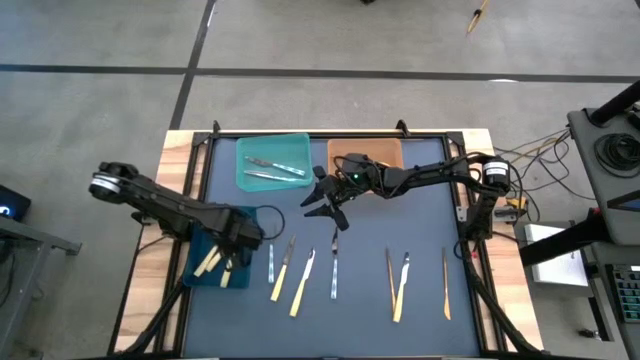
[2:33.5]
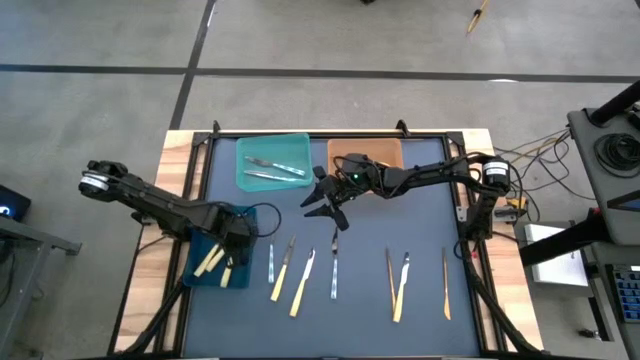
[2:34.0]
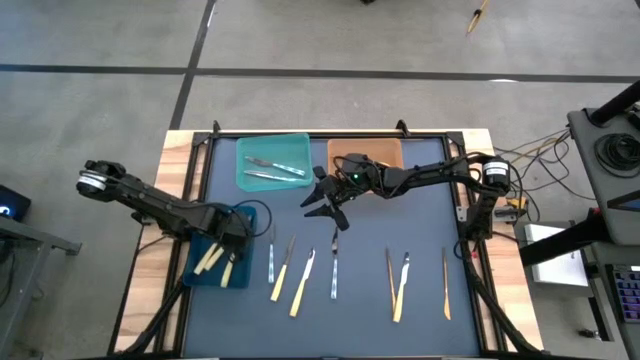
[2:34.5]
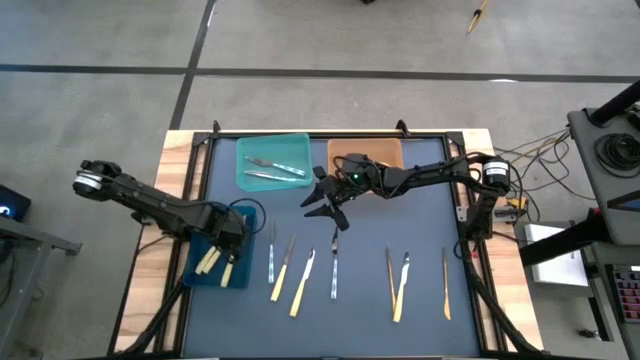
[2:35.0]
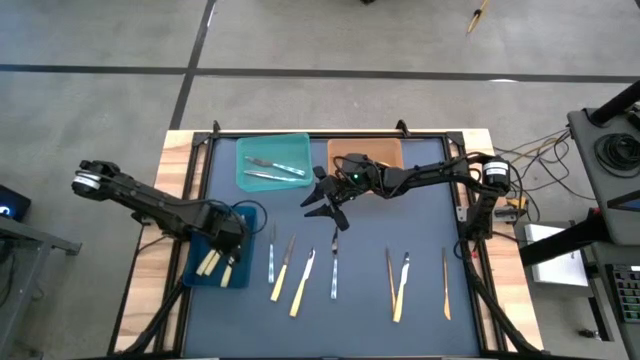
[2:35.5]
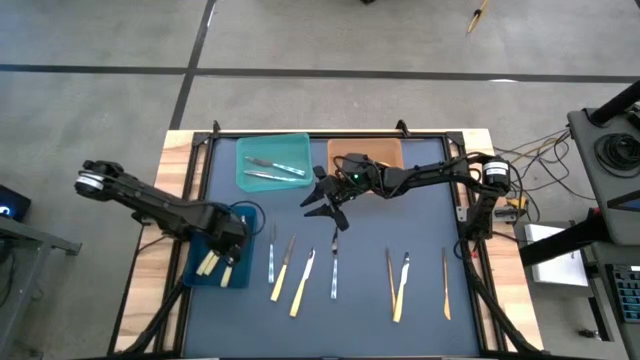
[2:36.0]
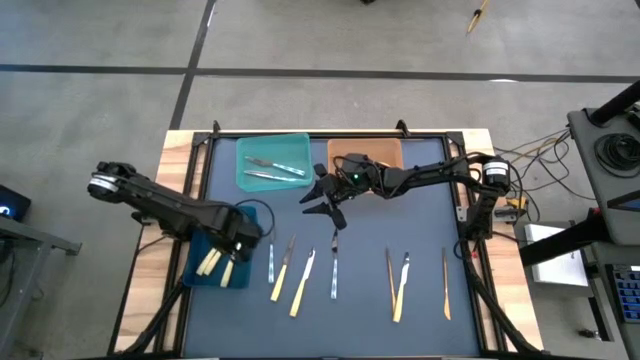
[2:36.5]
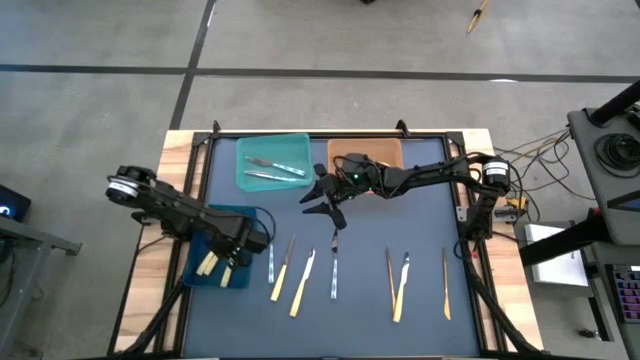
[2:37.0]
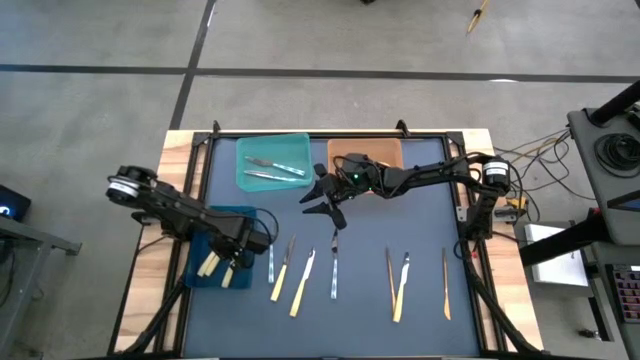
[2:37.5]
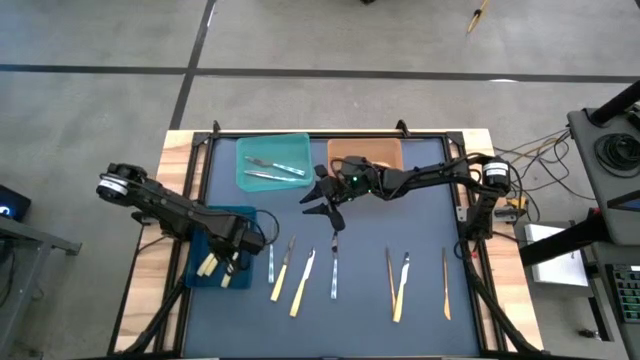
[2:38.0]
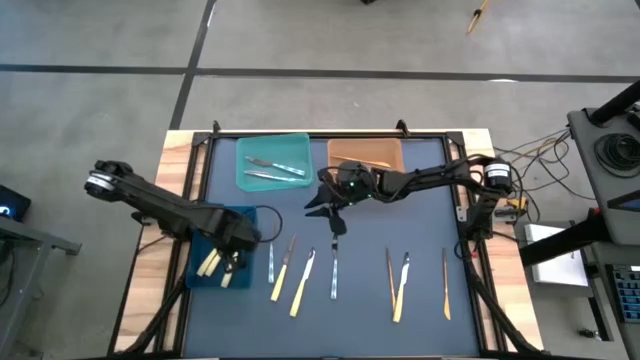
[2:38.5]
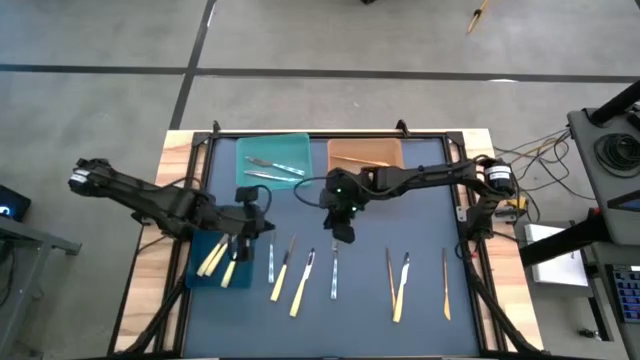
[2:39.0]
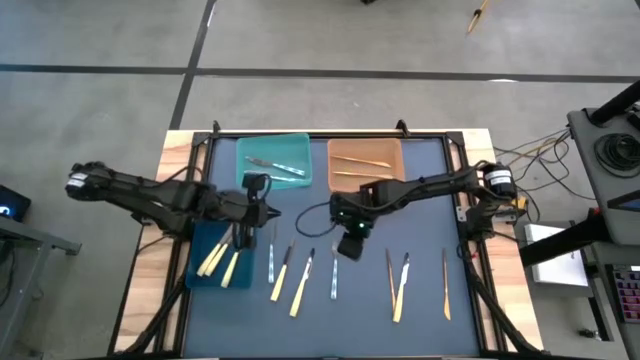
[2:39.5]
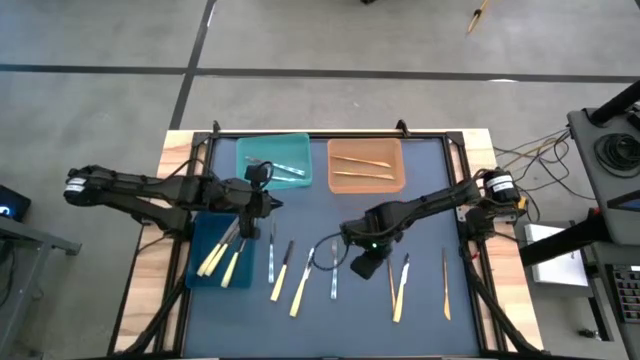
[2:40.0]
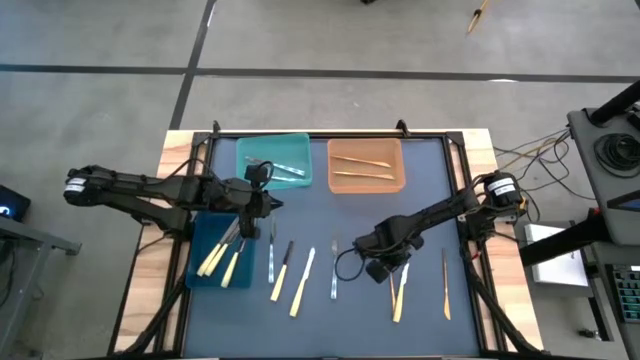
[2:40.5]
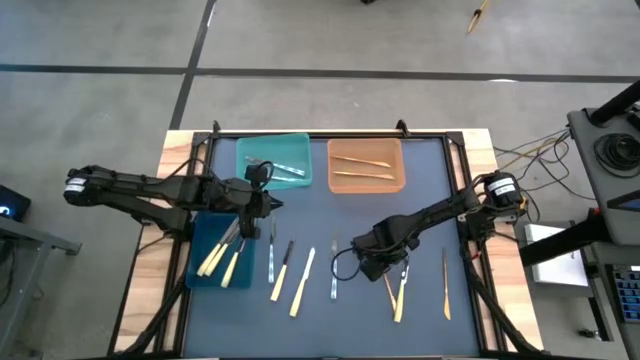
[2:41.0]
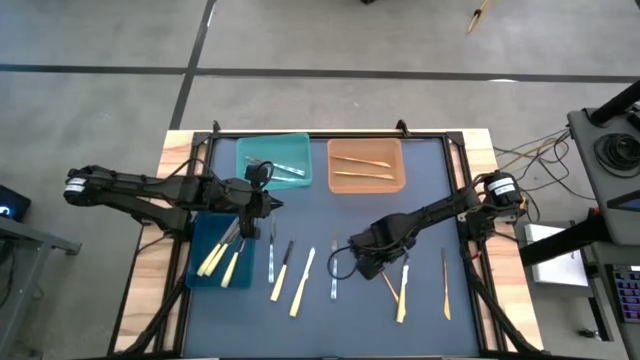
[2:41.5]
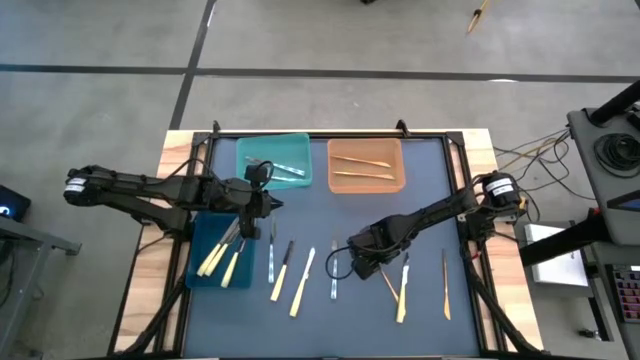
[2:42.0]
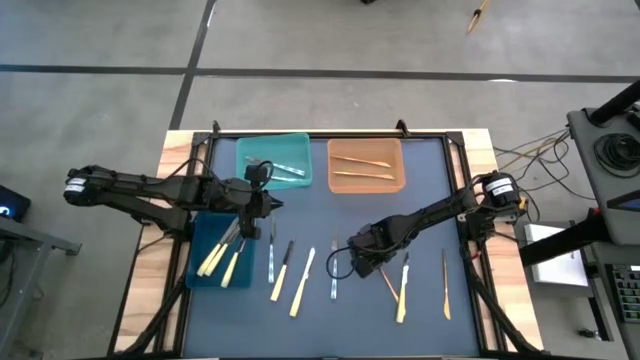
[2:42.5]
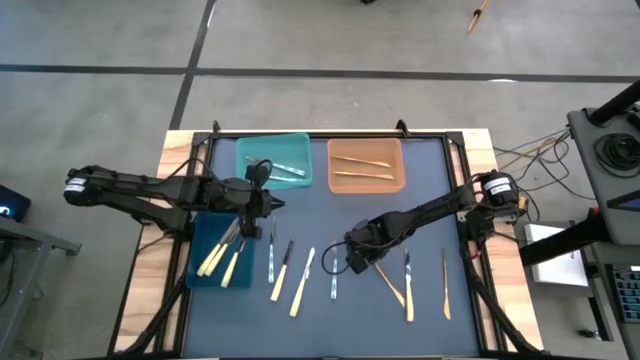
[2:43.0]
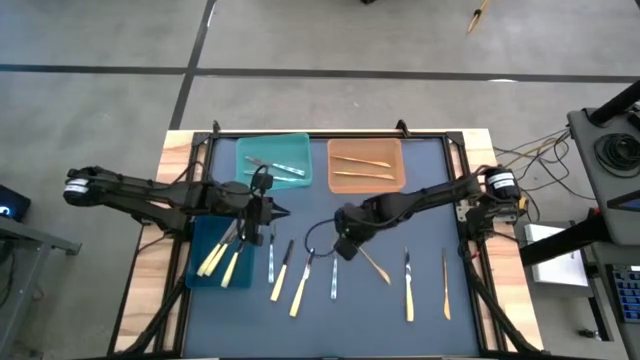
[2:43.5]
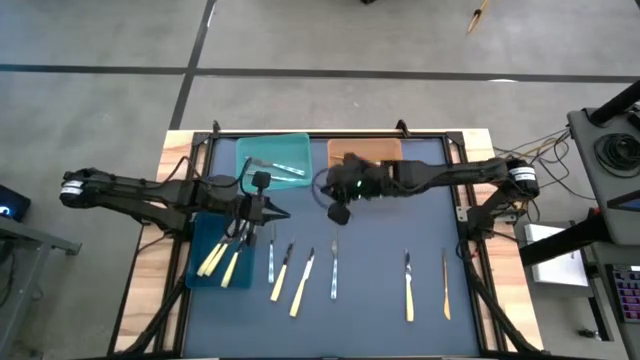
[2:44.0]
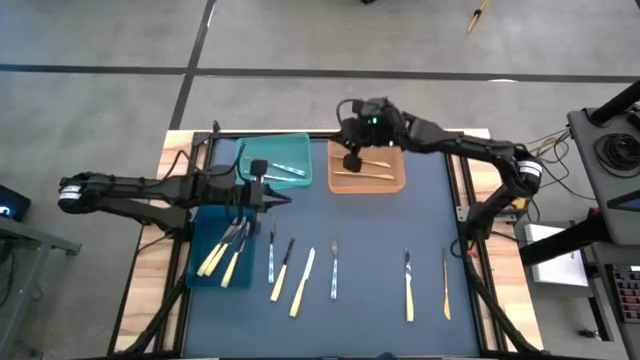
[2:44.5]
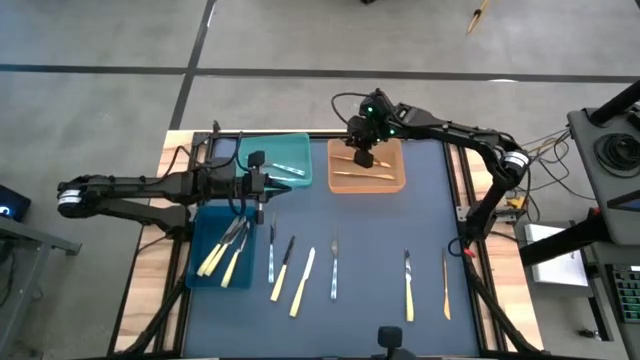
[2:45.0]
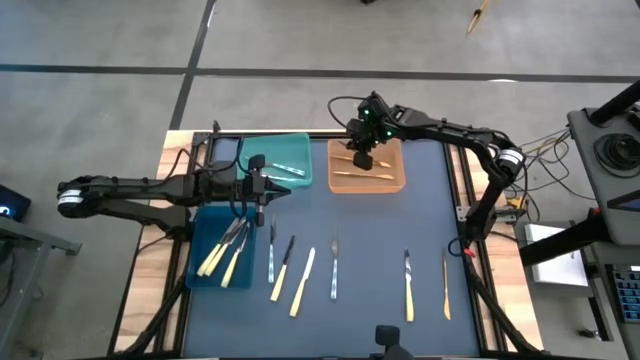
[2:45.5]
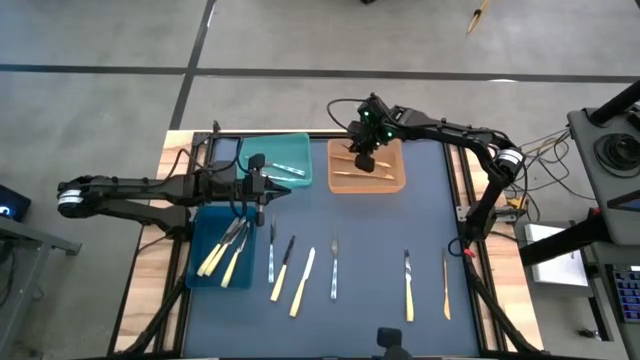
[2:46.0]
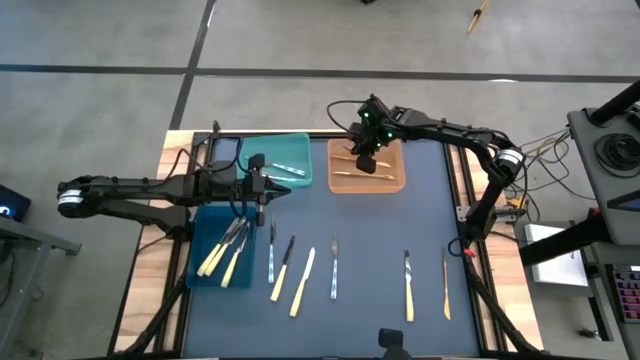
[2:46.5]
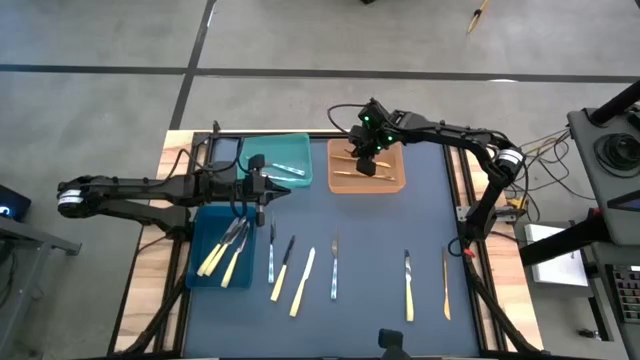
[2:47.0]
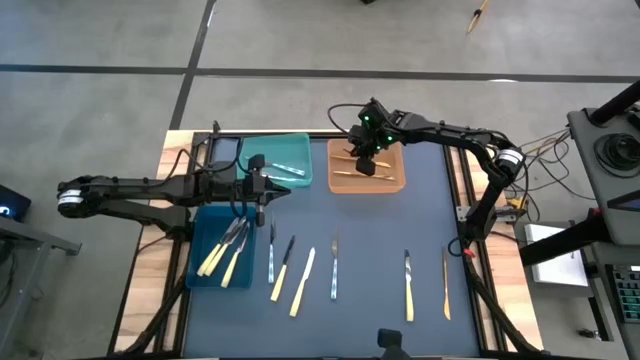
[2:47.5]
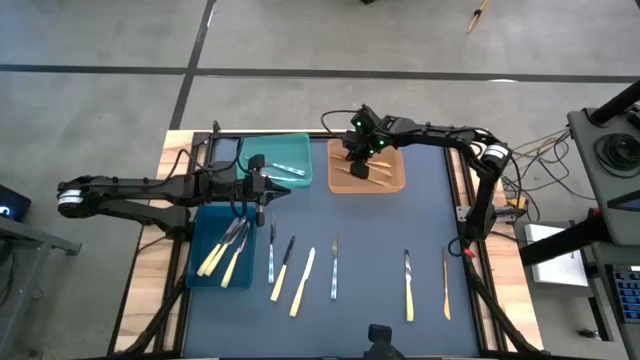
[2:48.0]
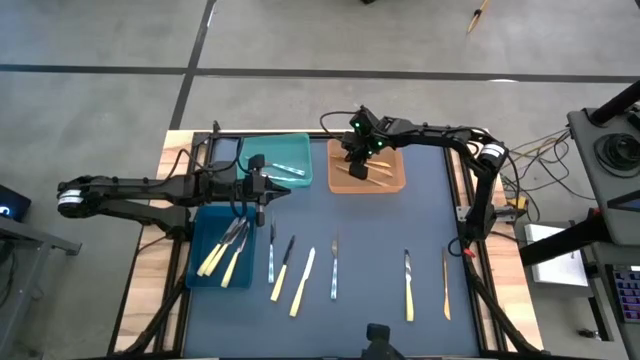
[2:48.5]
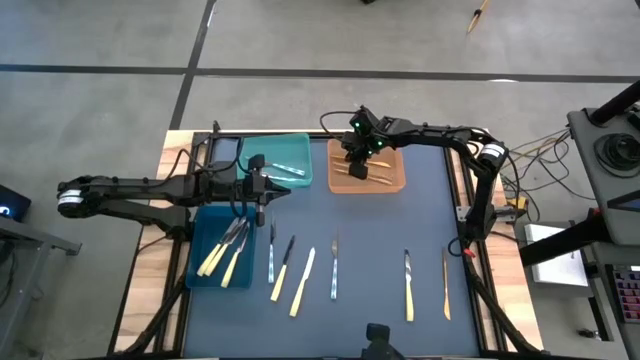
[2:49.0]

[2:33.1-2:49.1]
Task: Sort silverware by color (type)
Put the golden knife into the orange bin

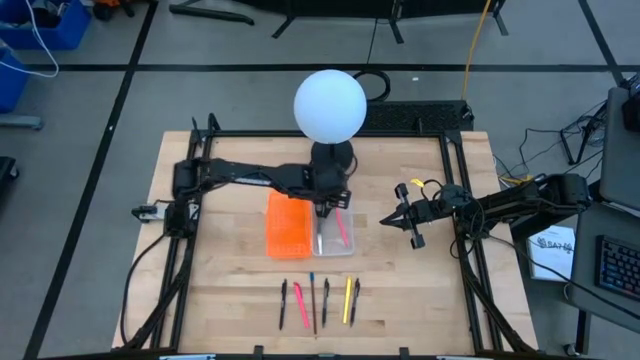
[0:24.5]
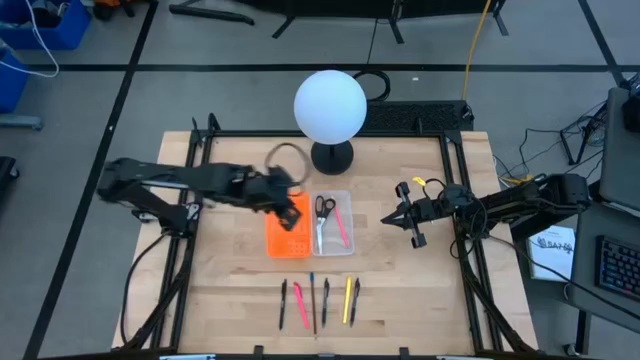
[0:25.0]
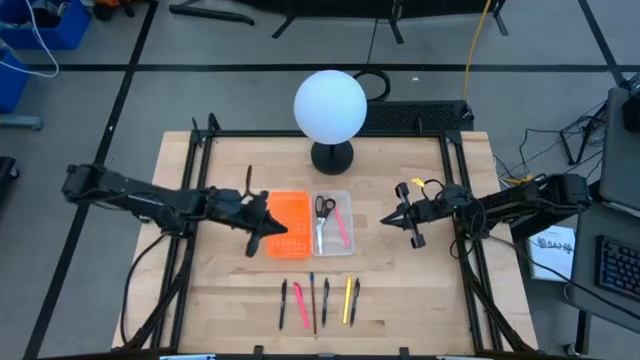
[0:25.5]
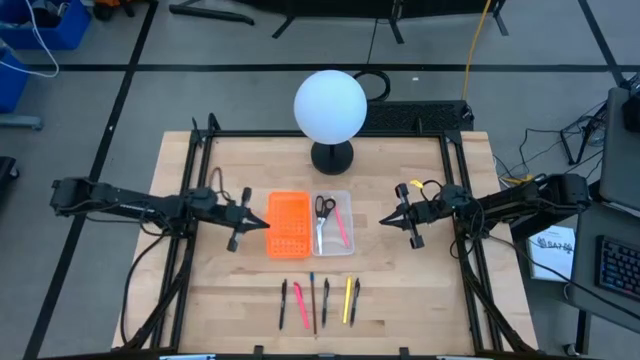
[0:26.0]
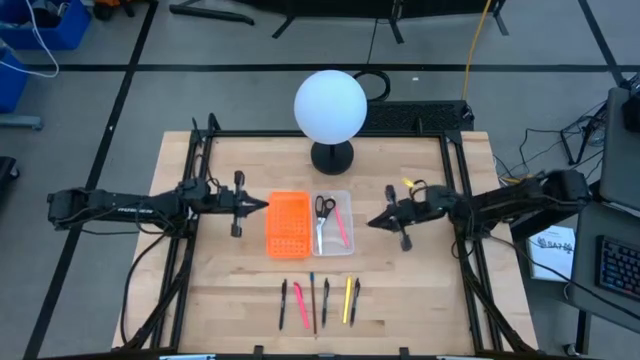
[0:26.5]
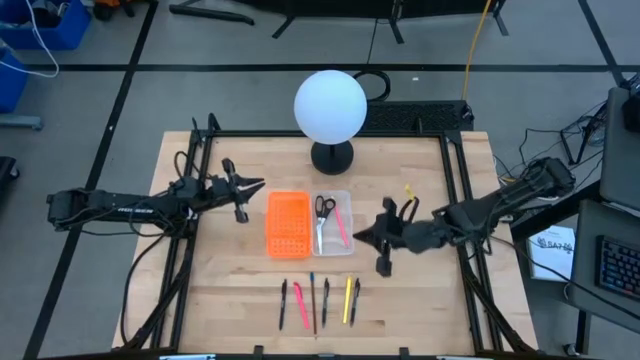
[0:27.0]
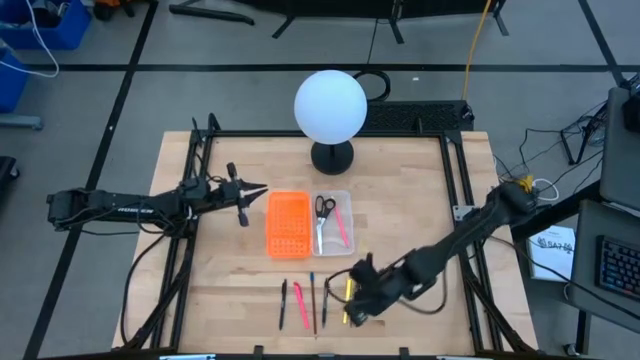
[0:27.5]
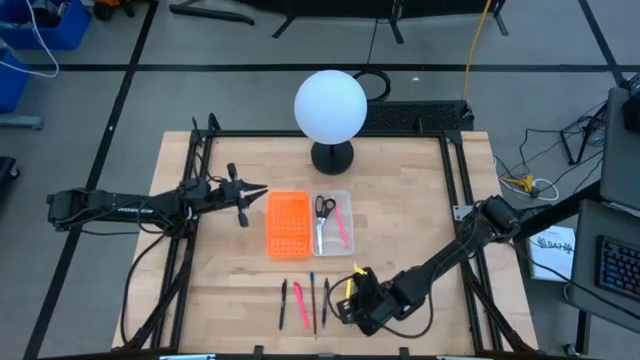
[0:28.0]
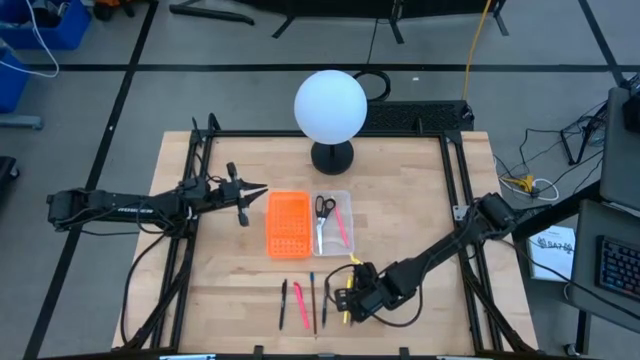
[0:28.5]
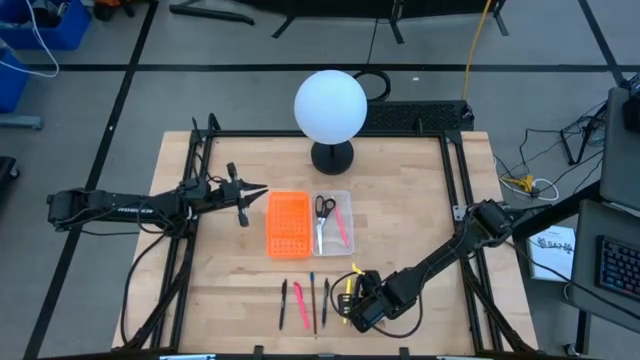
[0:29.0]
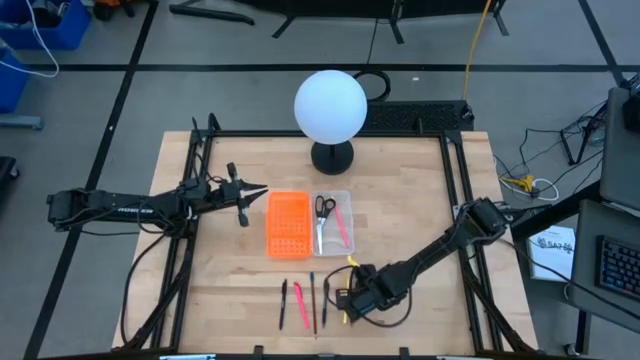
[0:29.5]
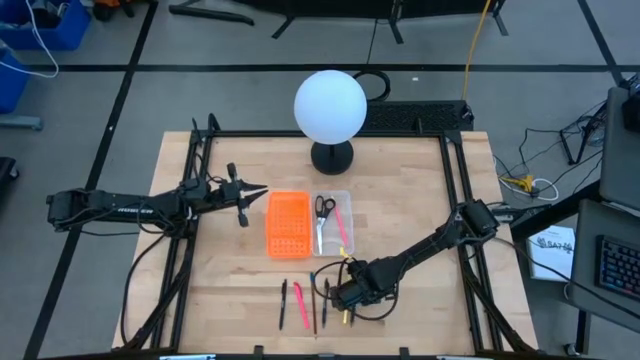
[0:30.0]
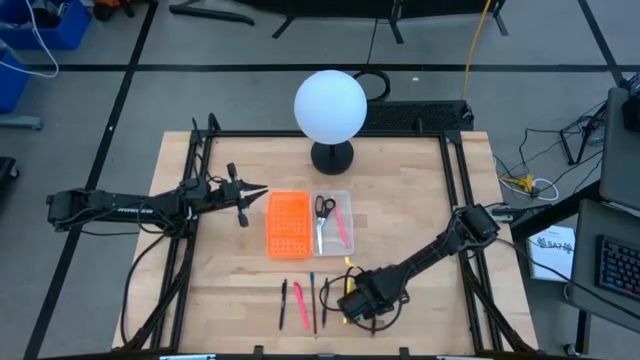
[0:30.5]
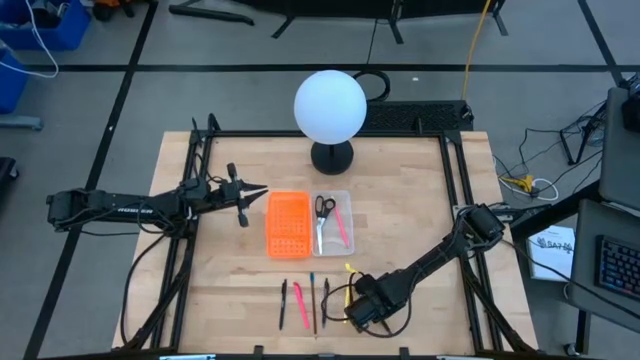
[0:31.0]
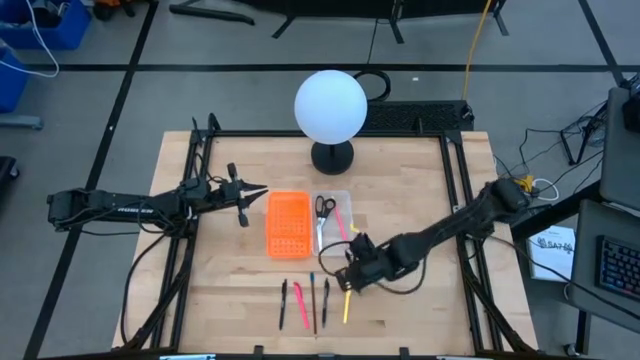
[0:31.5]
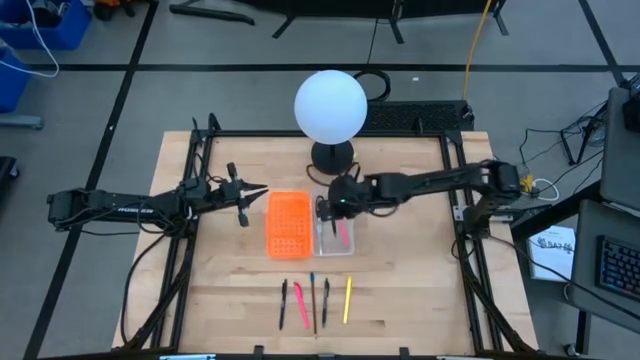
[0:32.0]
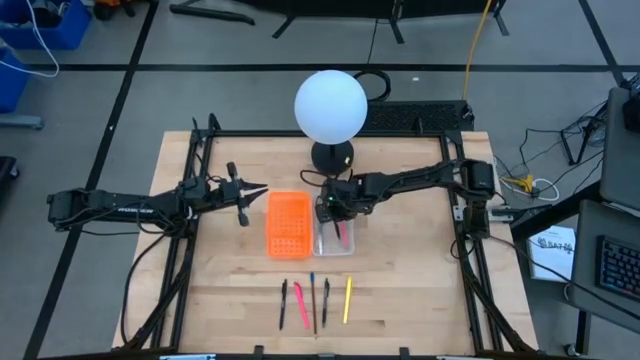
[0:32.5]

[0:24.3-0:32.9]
Task: Pick & place school supplies into a supply box
Put the right black pen into the supply box
